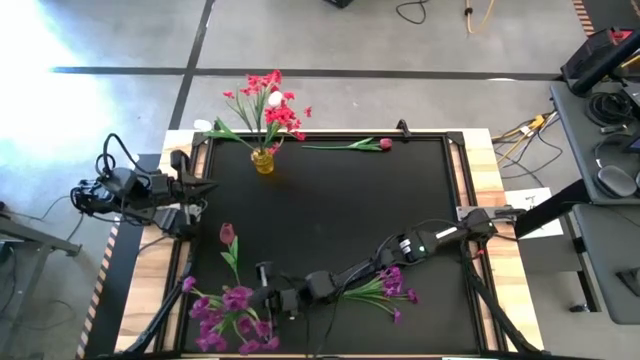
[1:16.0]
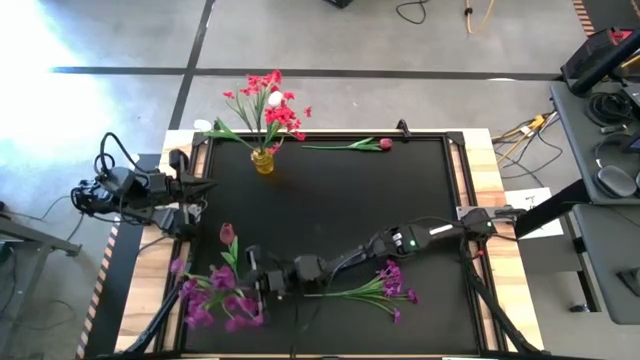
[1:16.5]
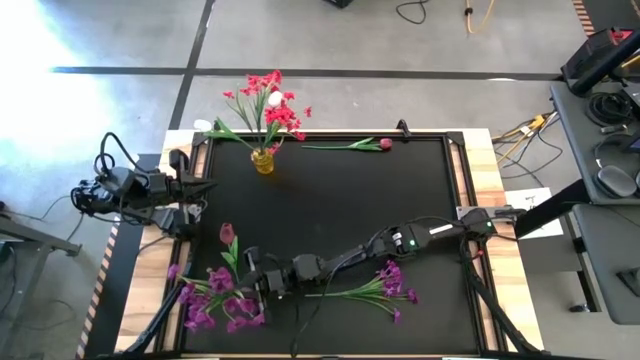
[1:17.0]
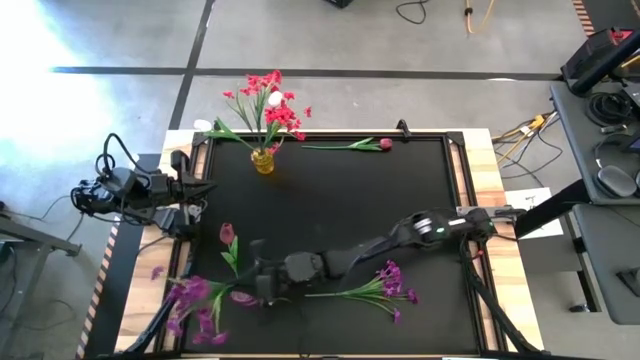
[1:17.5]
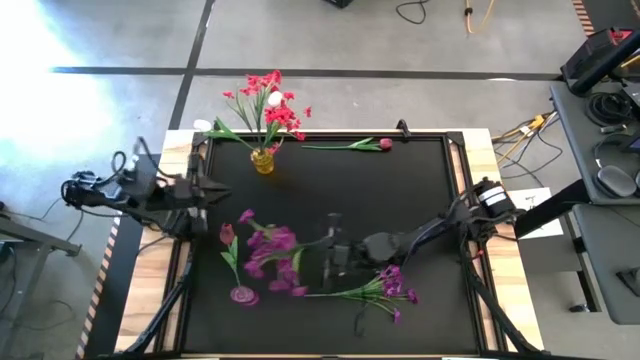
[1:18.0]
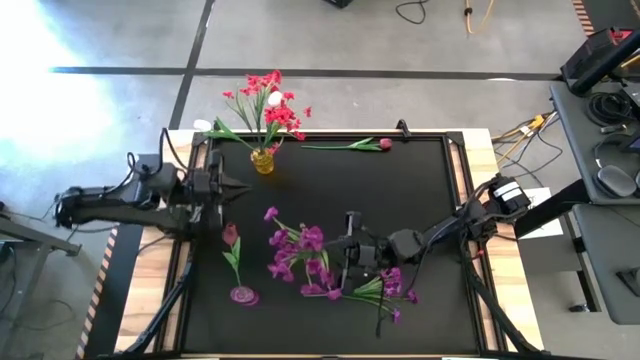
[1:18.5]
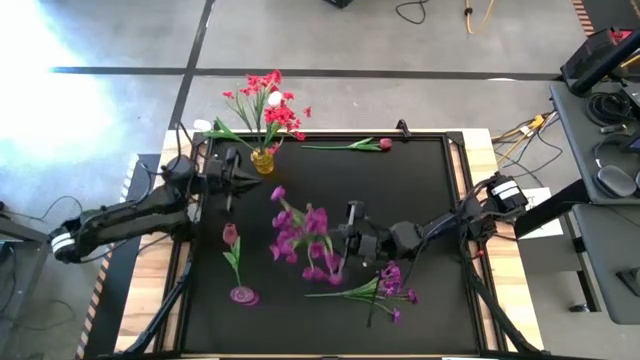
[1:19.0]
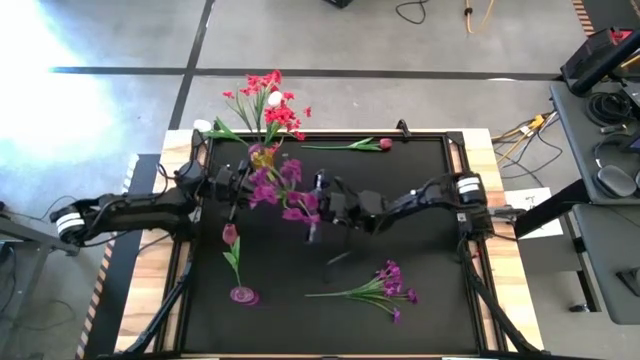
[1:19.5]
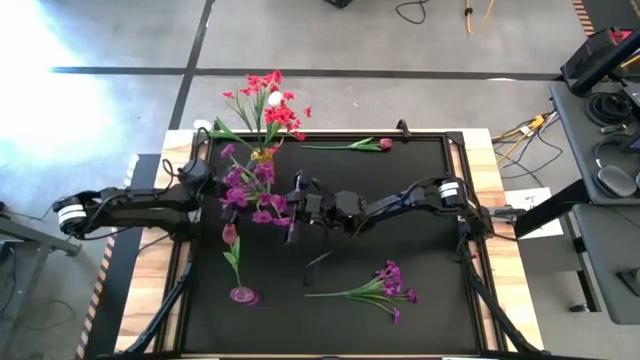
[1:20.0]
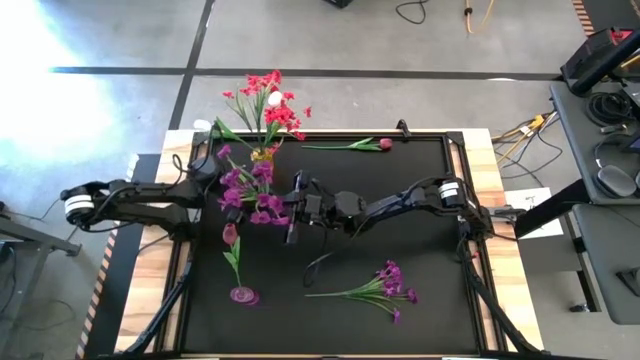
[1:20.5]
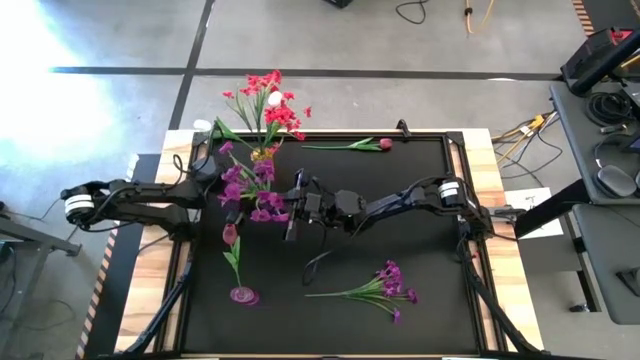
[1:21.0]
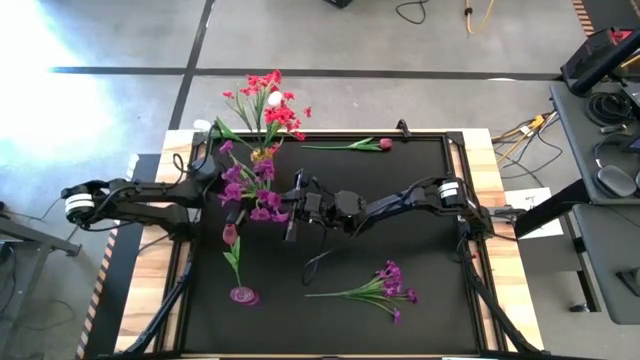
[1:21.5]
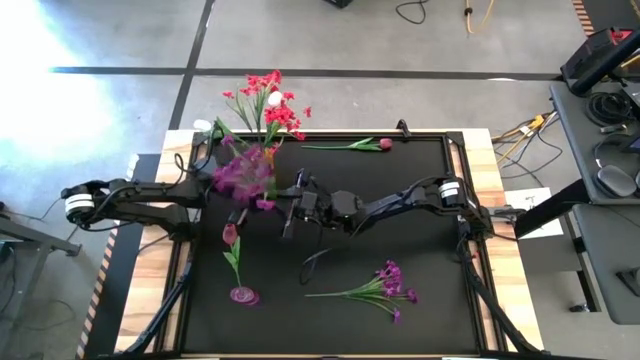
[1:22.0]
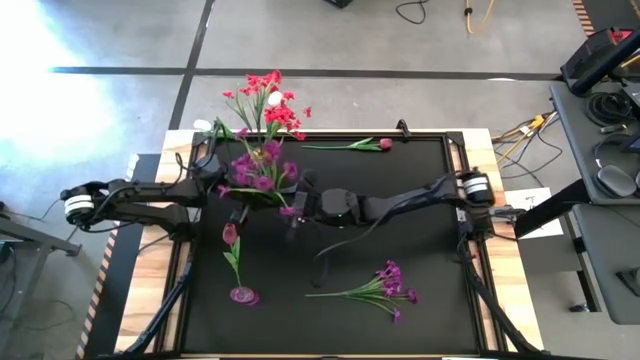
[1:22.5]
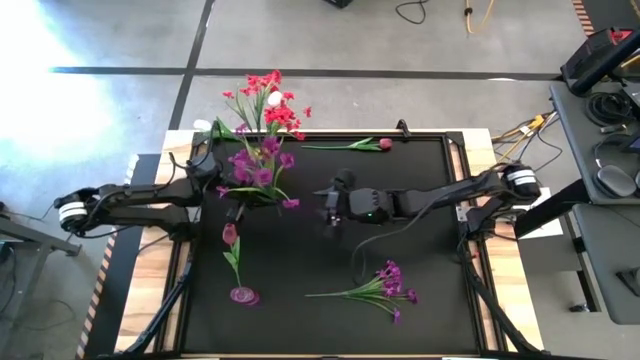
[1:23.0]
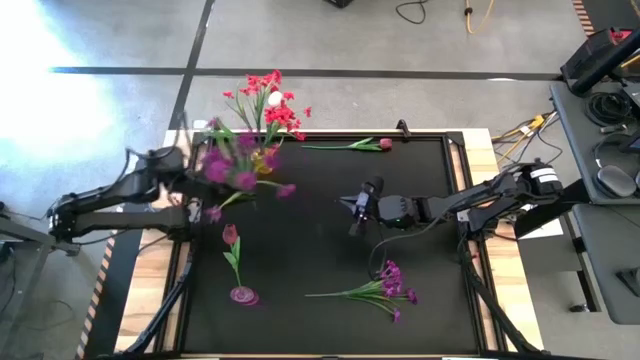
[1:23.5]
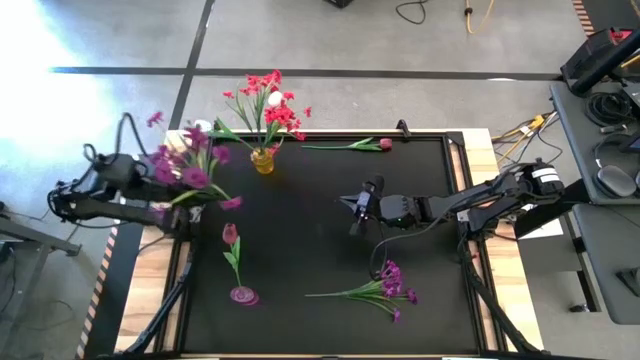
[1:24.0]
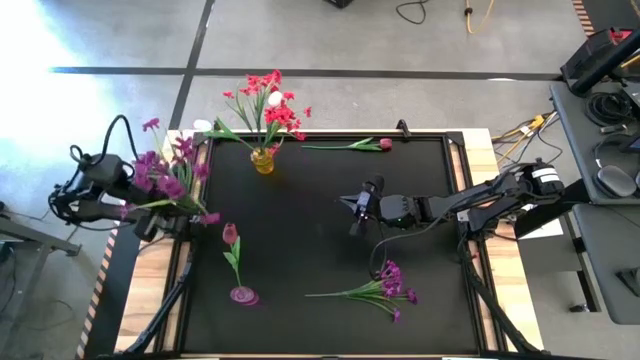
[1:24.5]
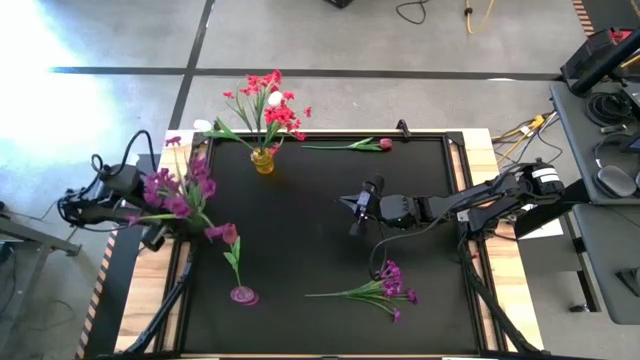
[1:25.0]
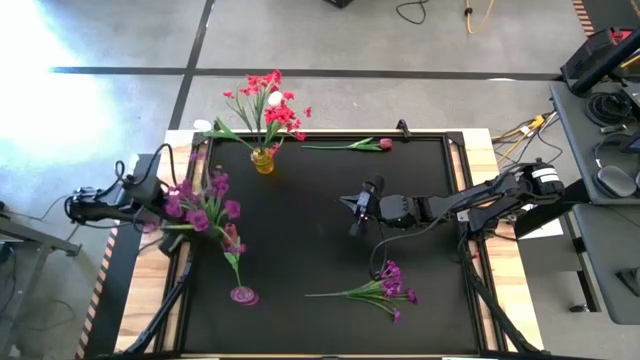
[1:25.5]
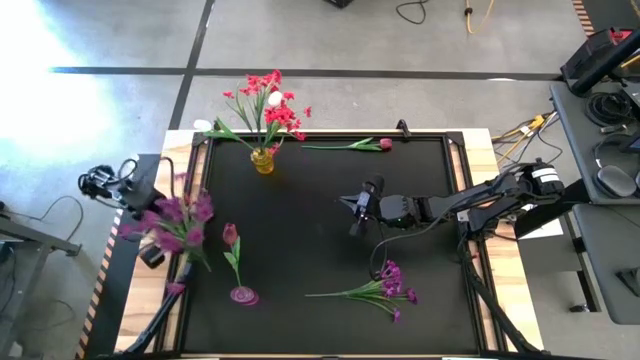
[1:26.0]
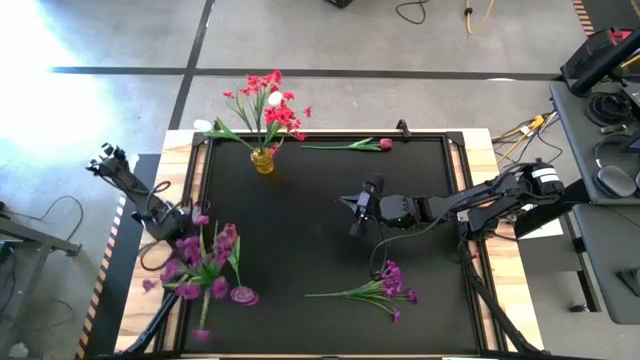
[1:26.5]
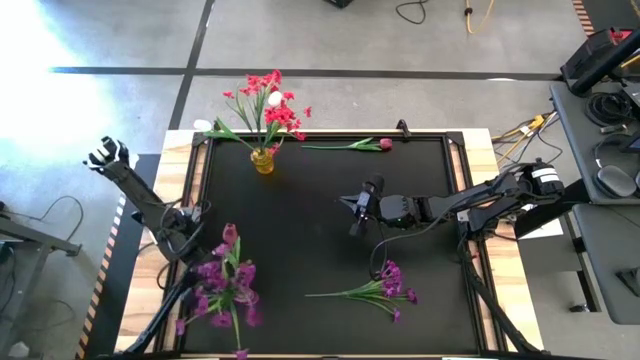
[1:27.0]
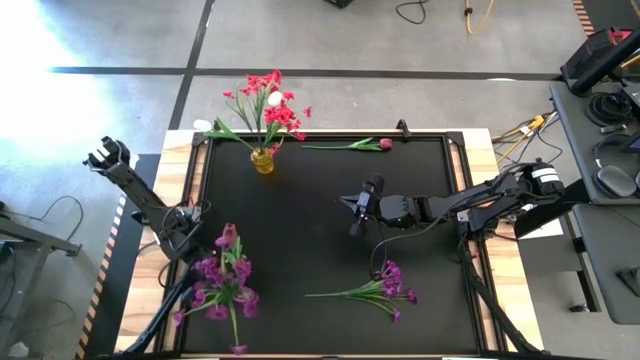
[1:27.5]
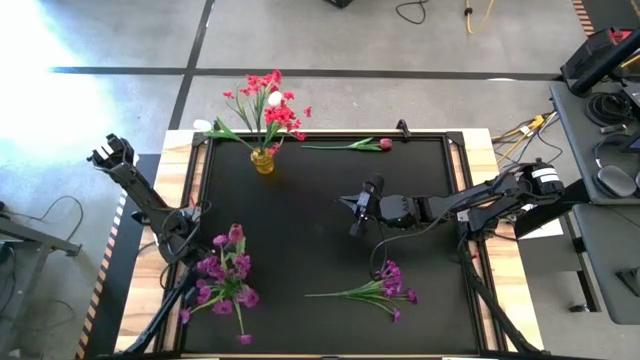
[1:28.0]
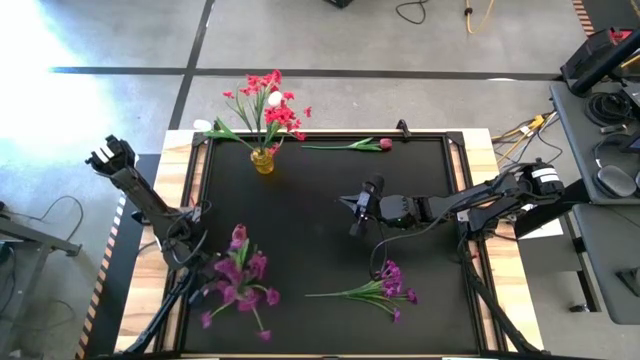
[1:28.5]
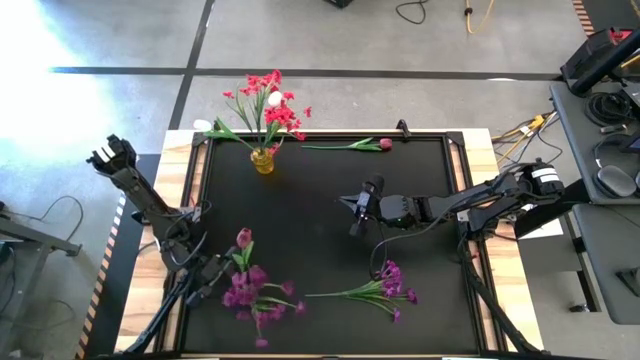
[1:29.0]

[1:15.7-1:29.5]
Task: Sort flowers into vase by color
Put the top violet flowers into the violet vase

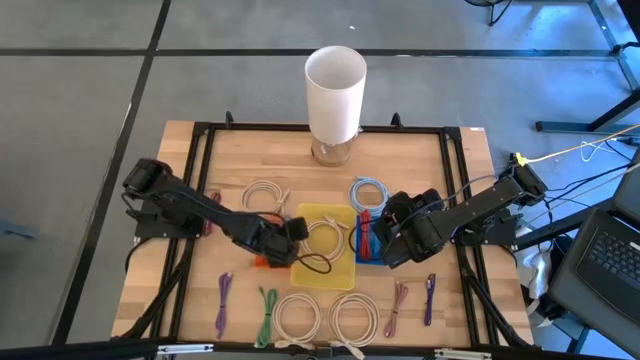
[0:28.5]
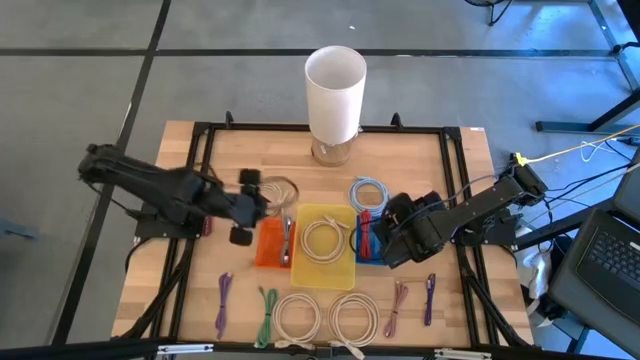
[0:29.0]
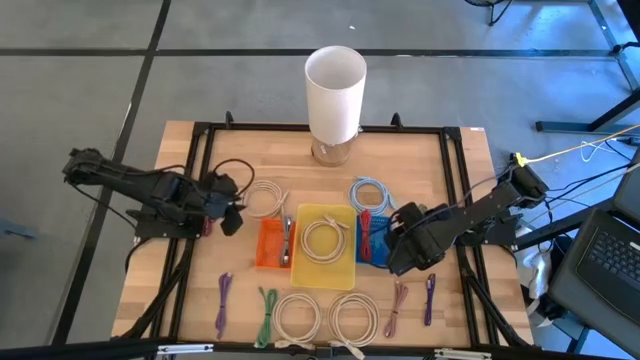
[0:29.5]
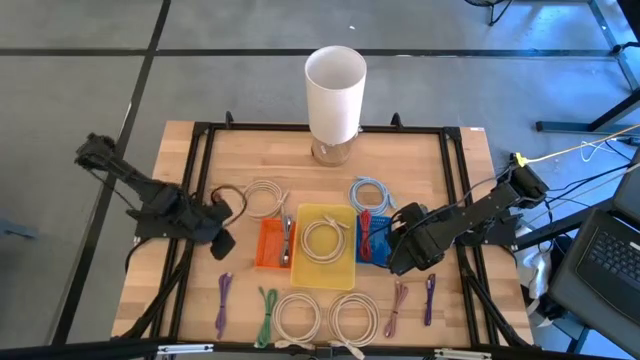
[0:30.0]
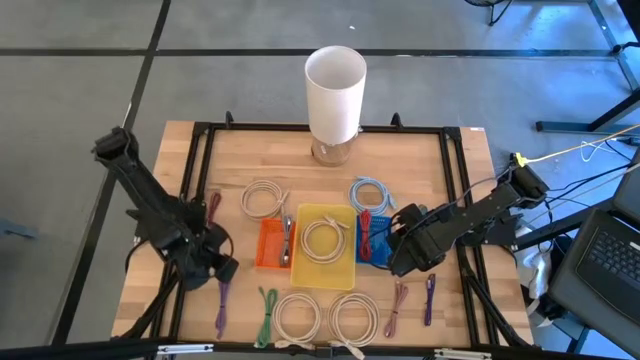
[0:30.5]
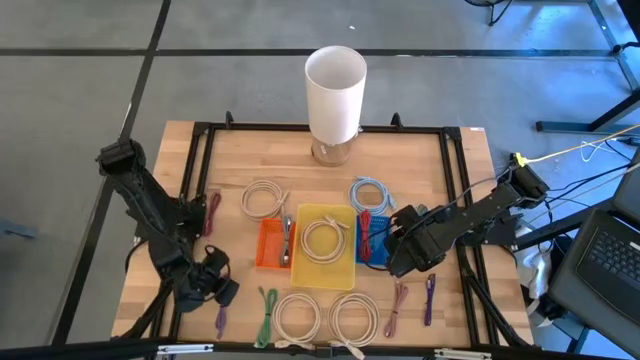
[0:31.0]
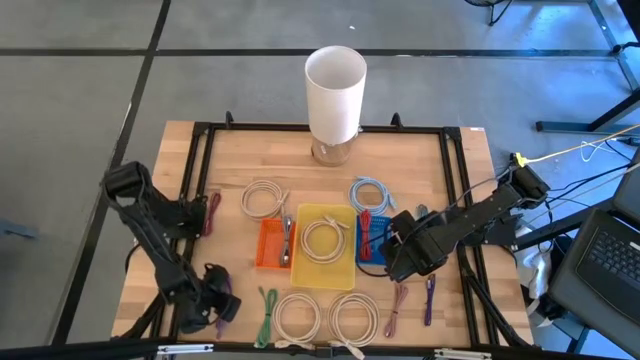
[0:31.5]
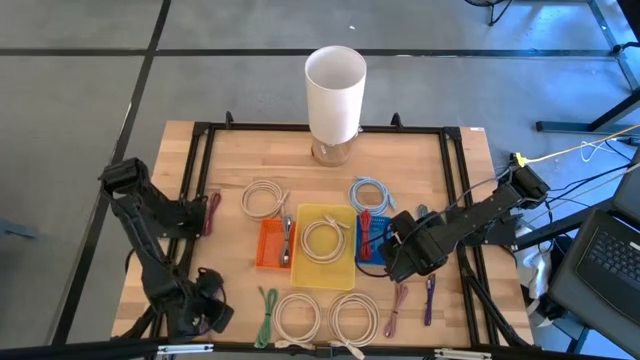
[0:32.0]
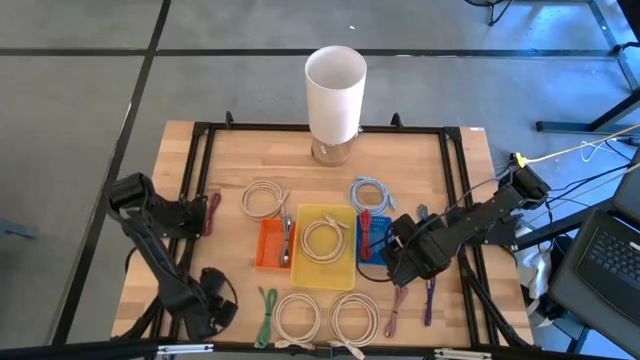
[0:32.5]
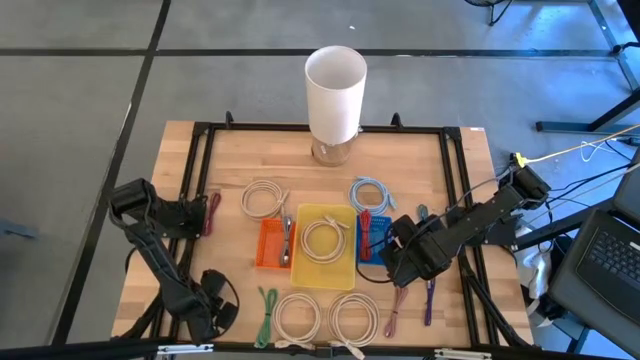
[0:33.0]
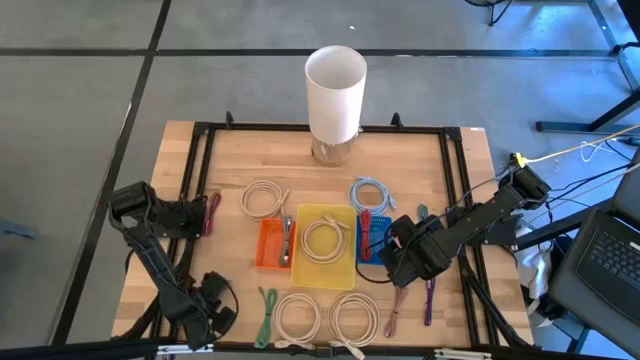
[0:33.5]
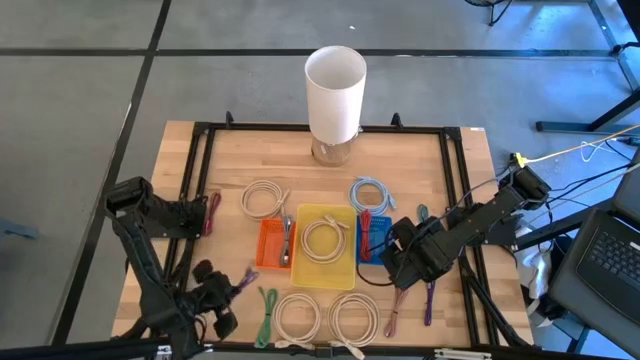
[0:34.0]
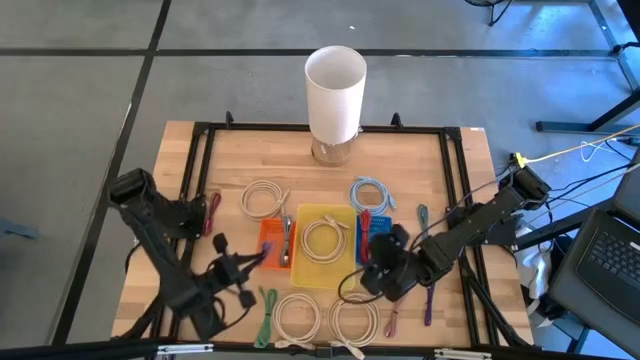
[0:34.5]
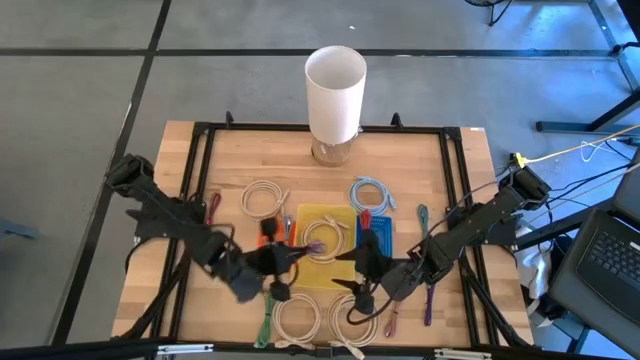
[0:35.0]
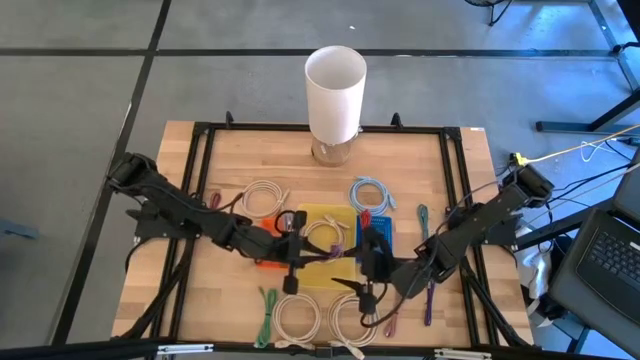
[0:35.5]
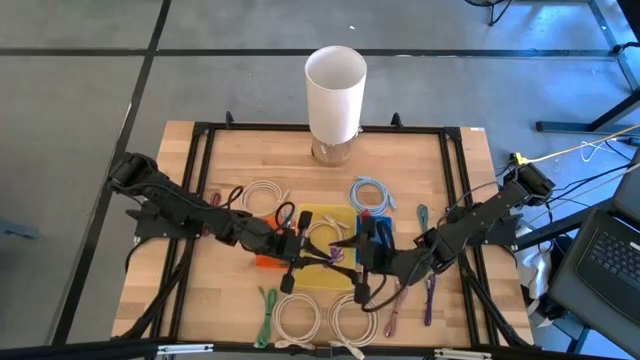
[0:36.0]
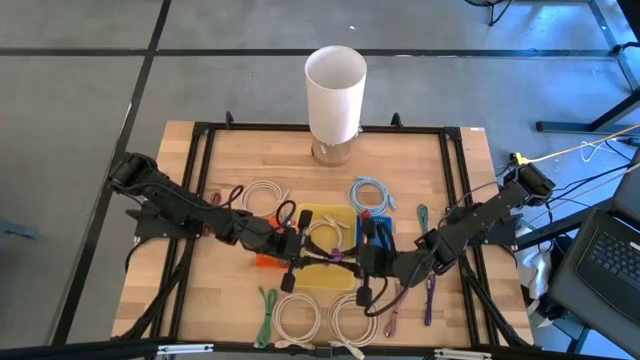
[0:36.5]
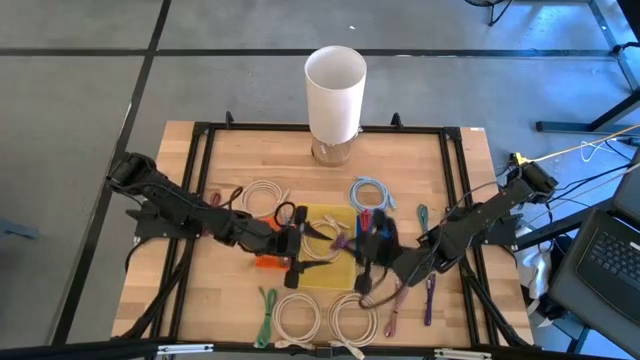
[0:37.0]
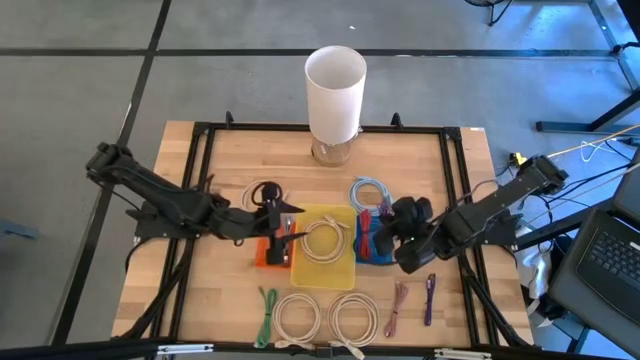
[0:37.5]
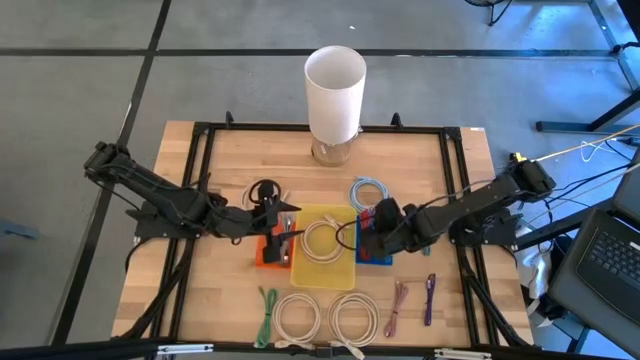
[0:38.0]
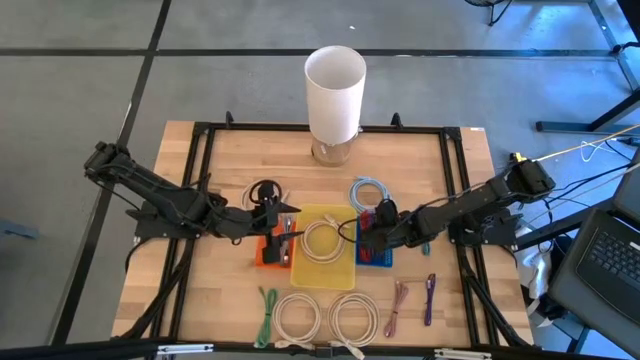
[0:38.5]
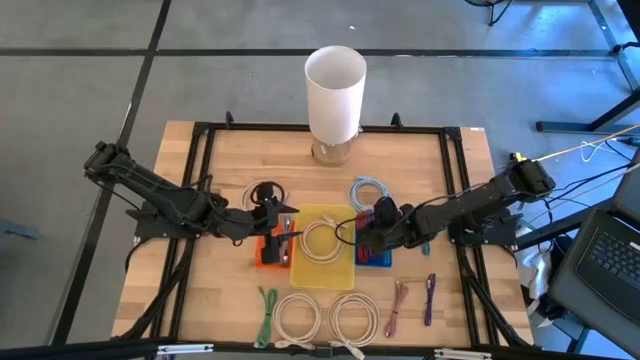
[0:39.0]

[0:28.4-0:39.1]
Task: Pick & Place USB Port
Put the purple charger cable into the blue bin
